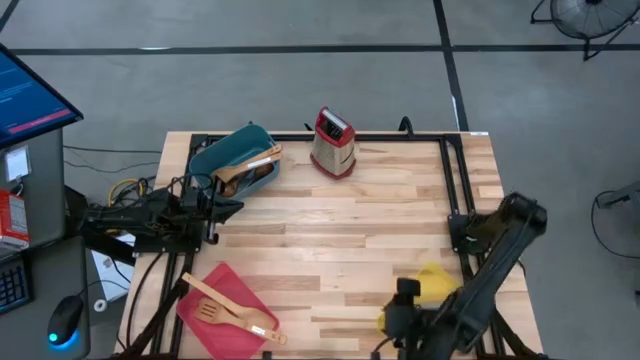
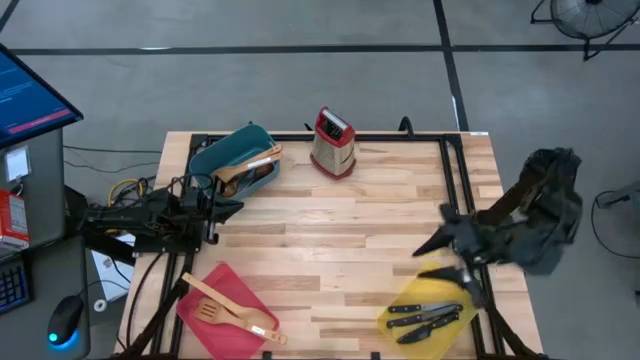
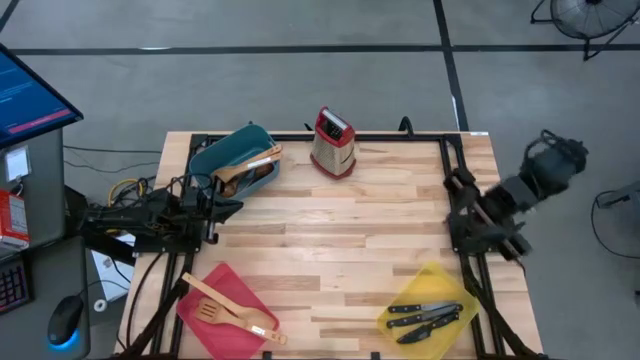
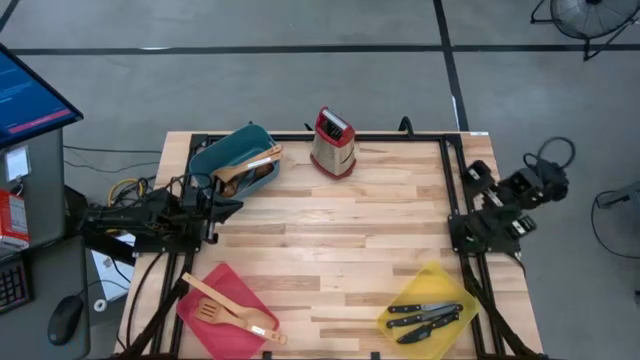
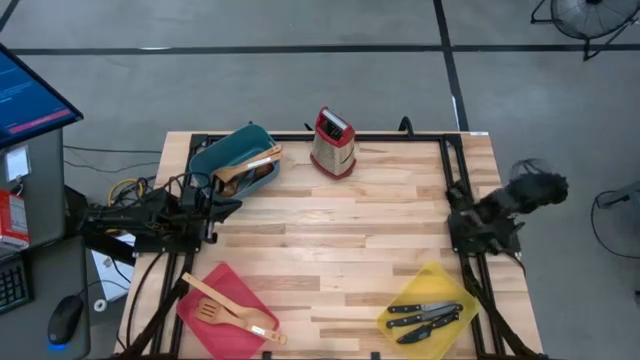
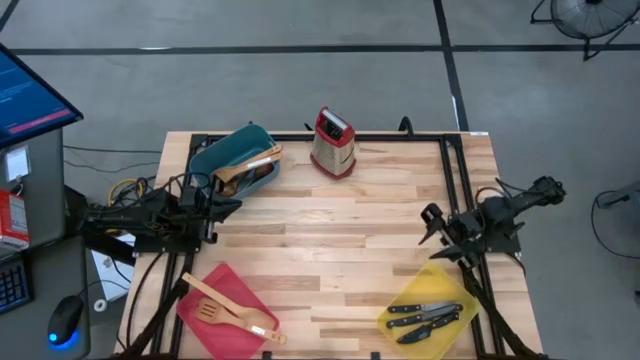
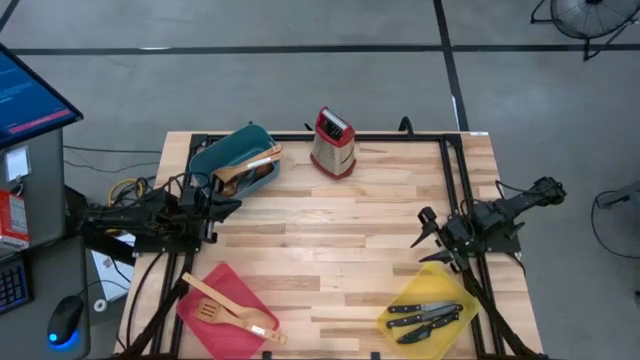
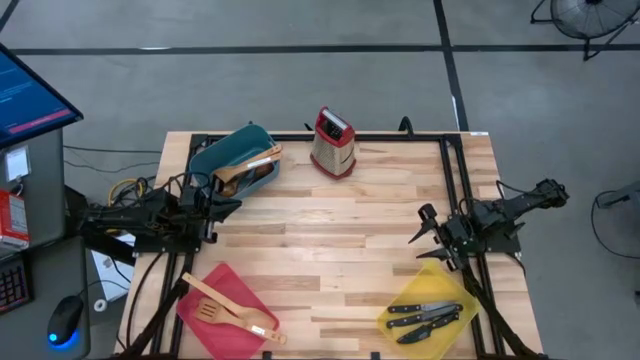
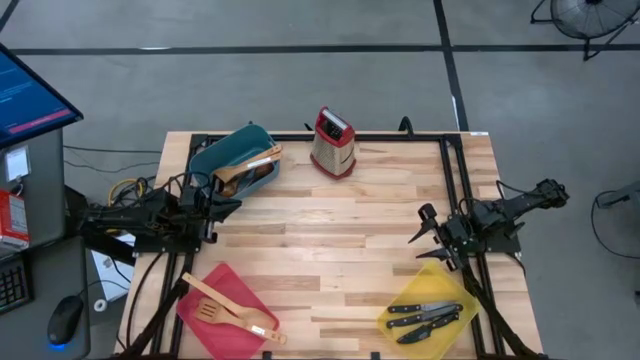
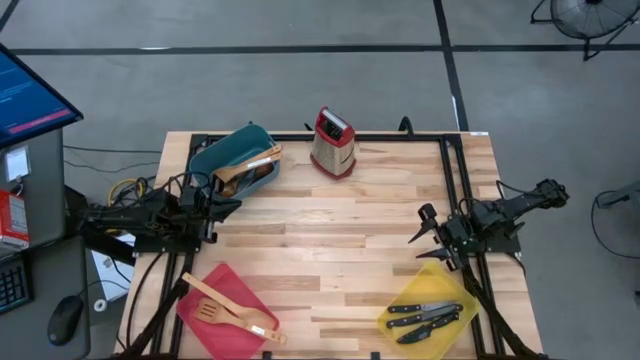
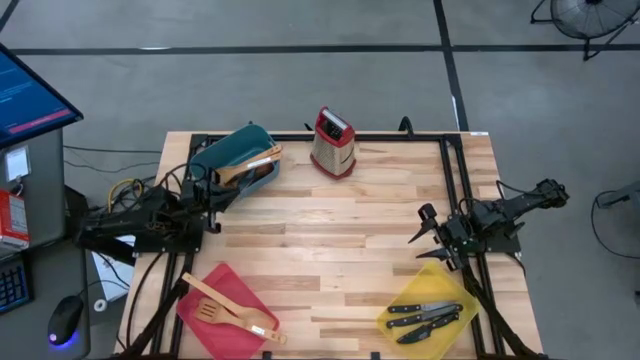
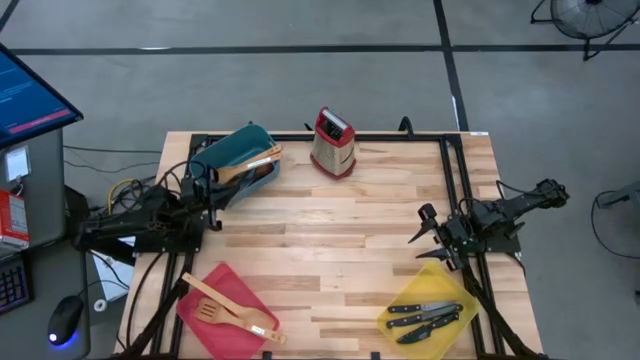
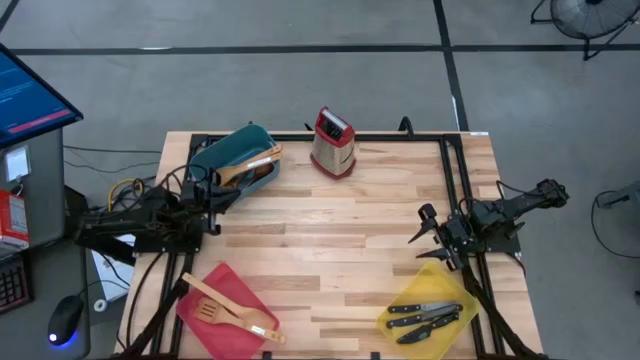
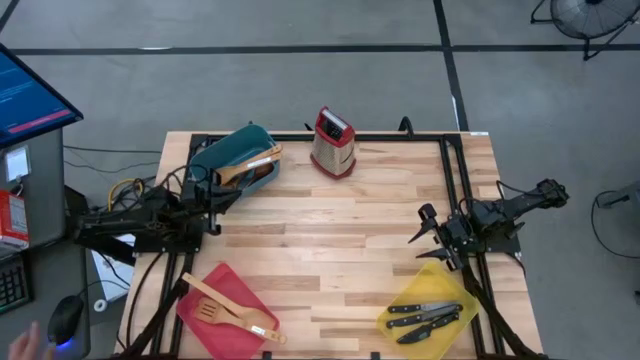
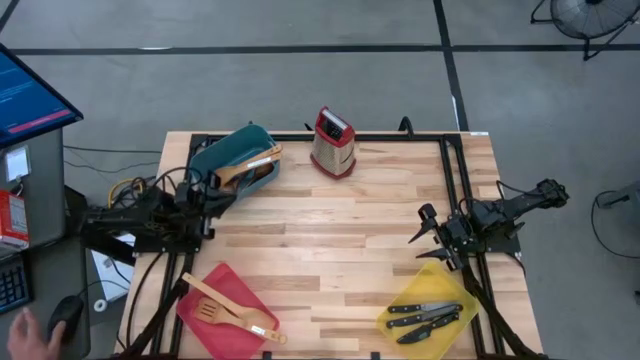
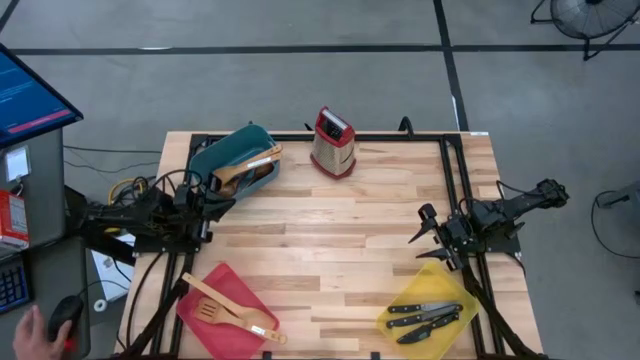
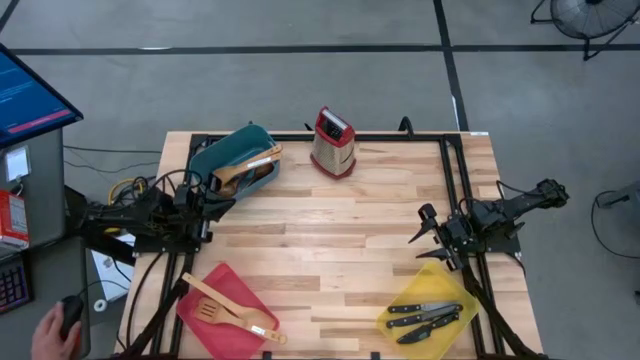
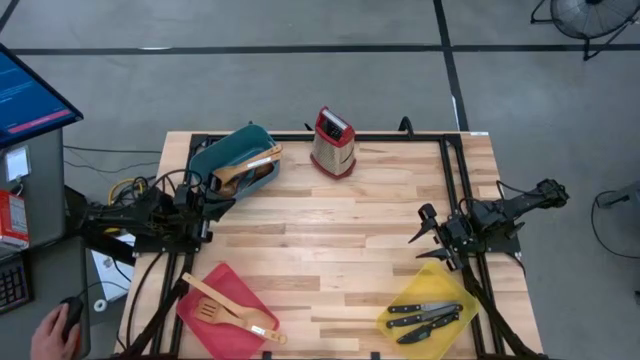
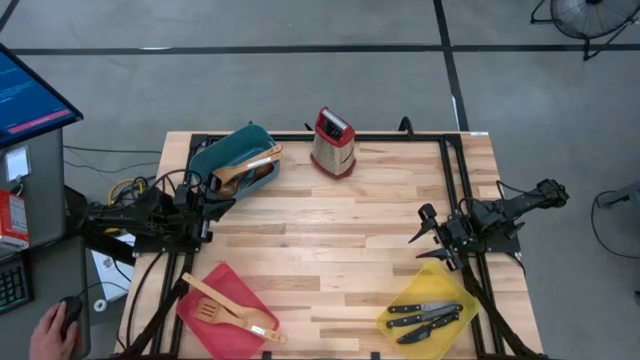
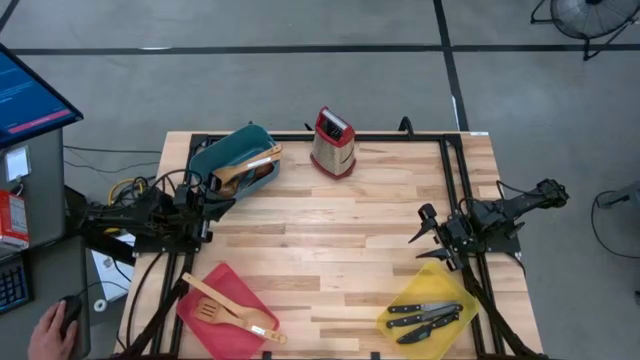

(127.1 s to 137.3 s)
Task: Pick & Place Kitchen Items
Return to Home Position

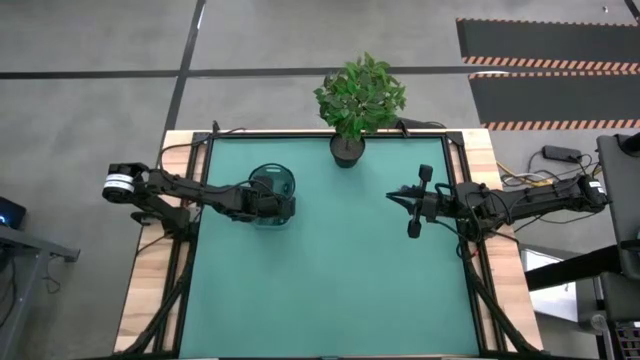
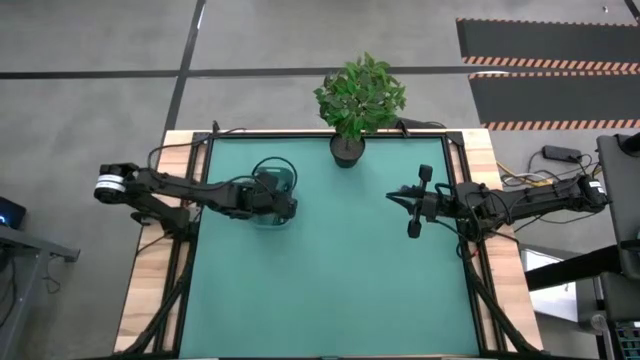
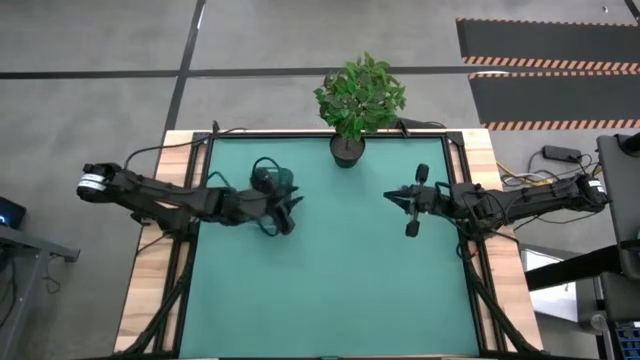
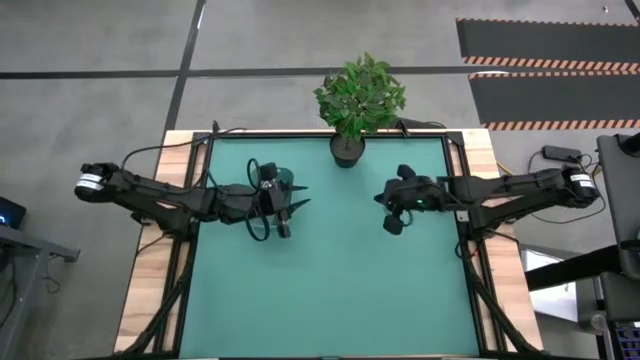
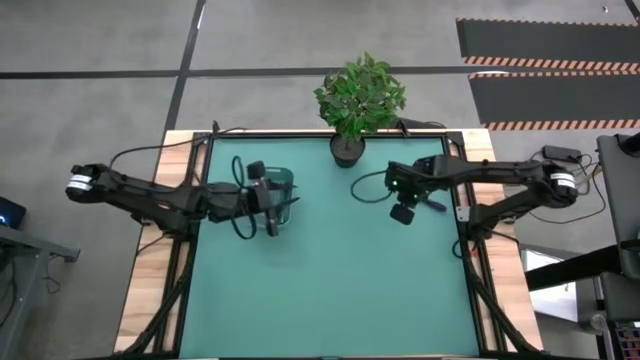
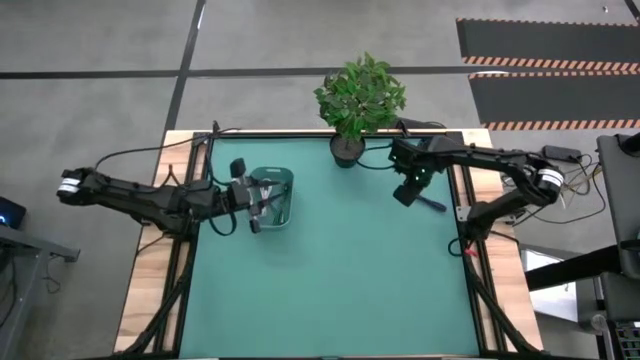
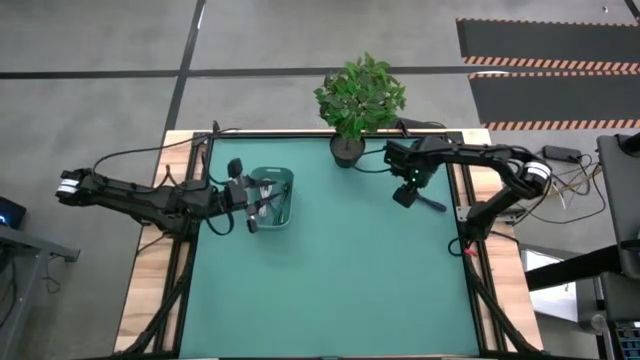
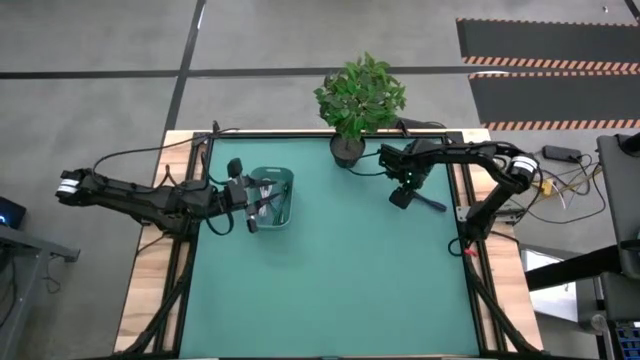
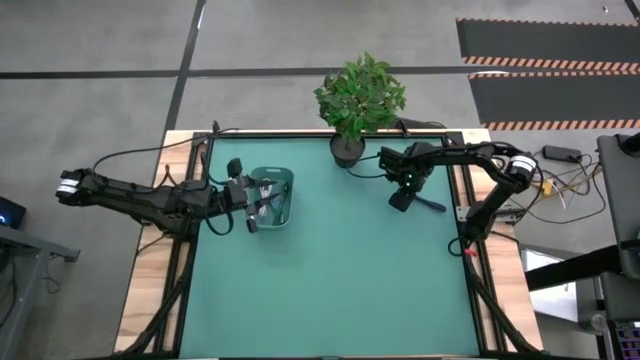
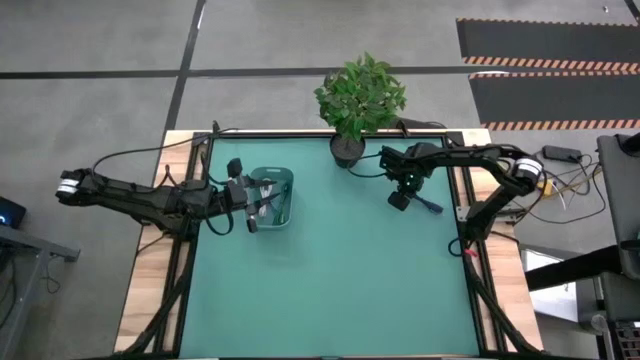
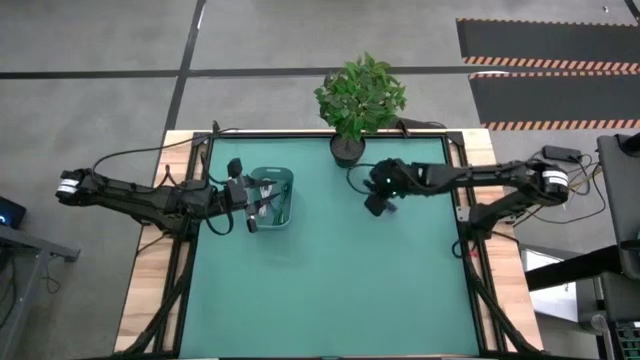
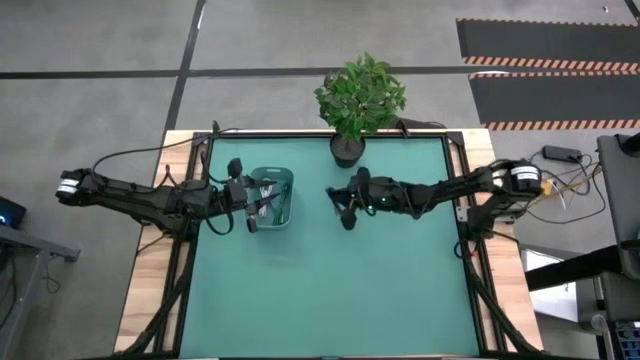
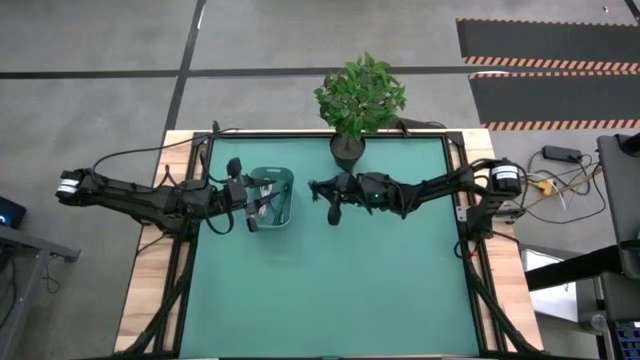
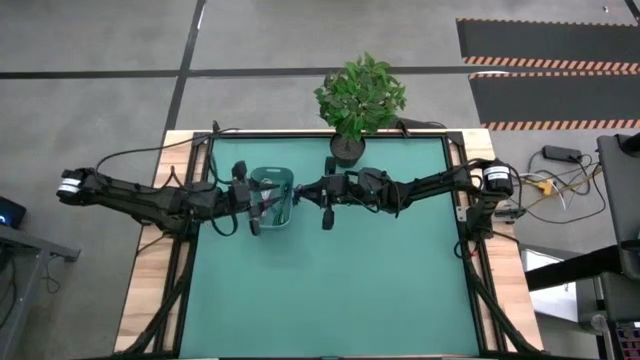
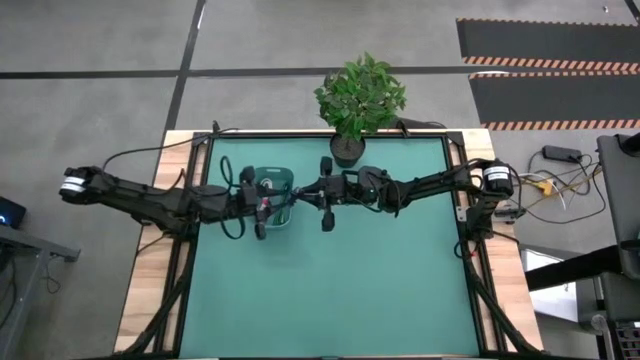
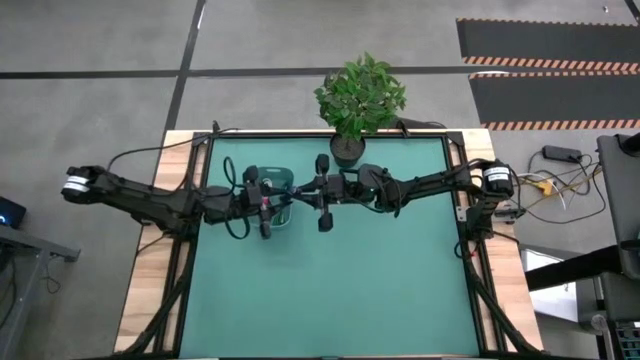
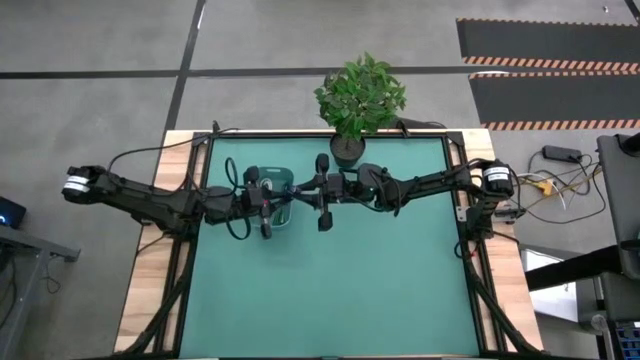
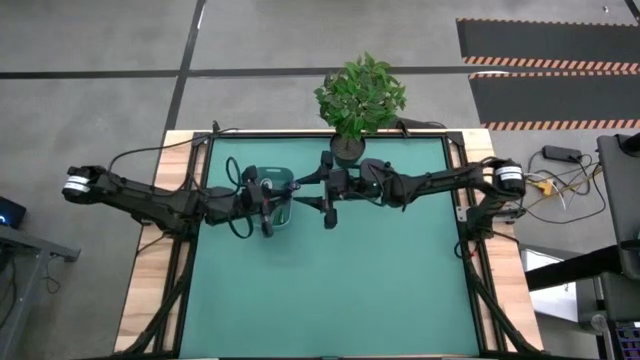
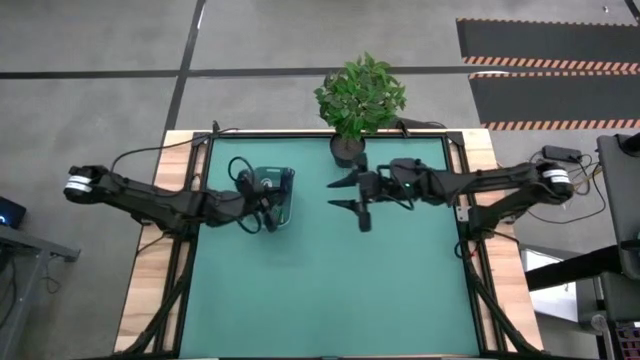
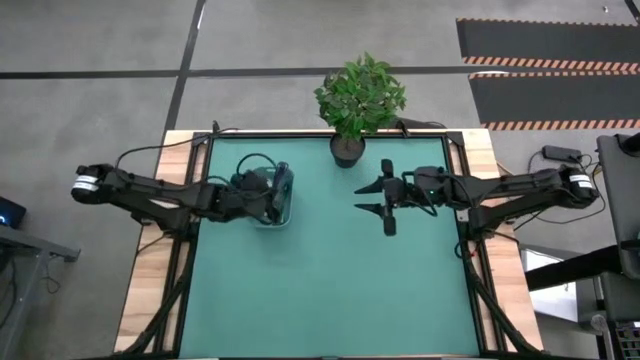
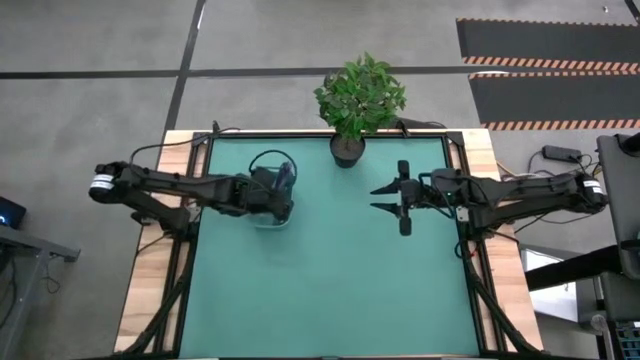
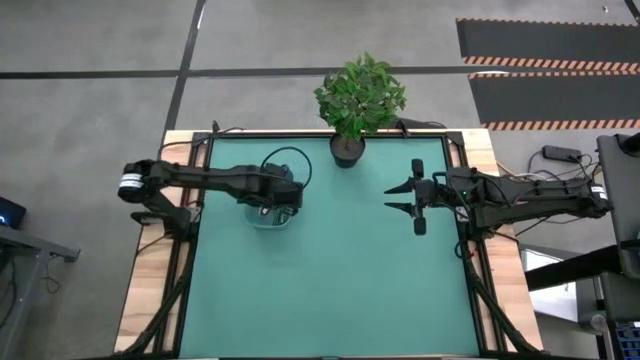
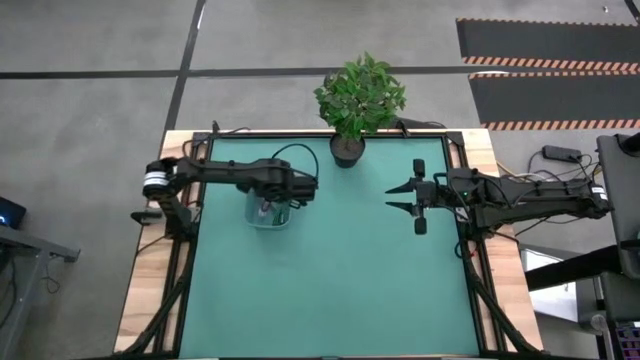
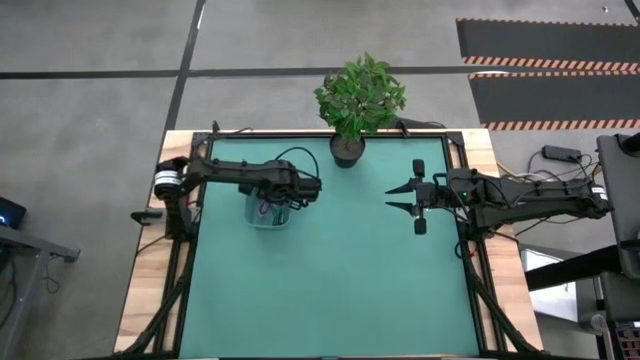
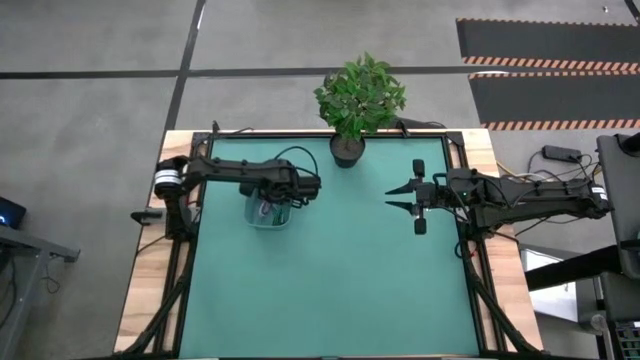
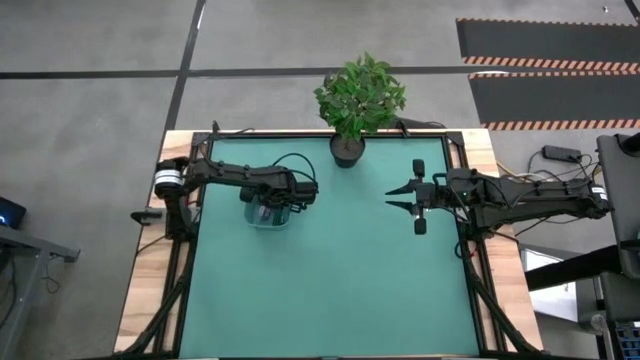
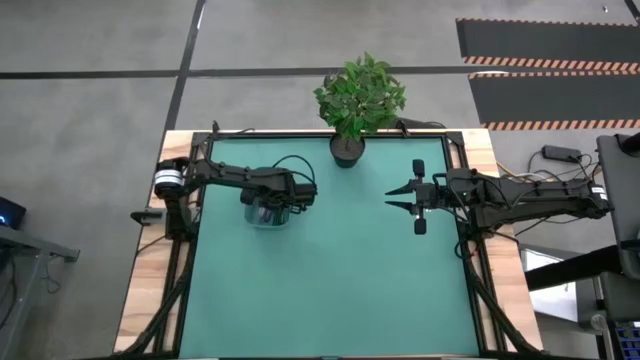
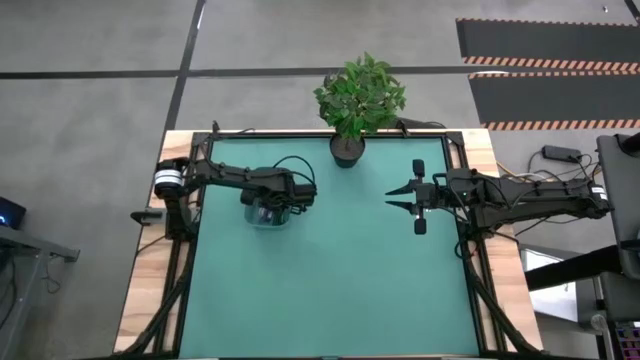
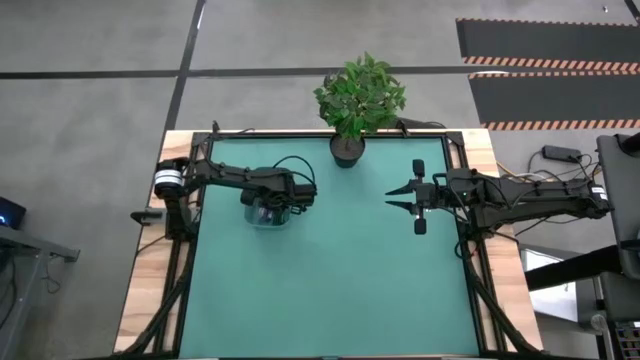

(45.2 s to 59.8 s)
Task: Pick and place USB-C Cables
Put the black violet charger cable into the green bin
